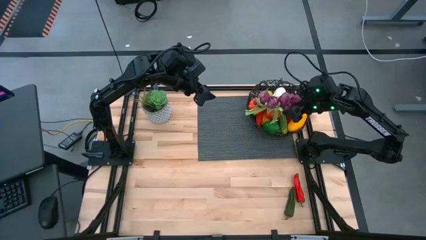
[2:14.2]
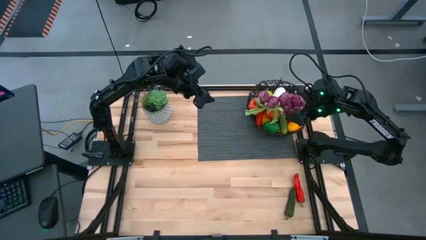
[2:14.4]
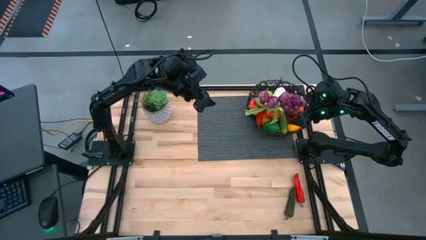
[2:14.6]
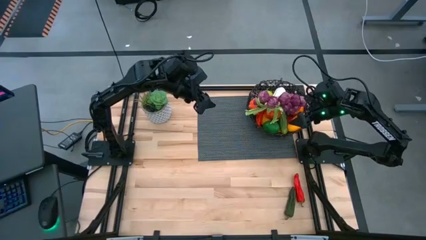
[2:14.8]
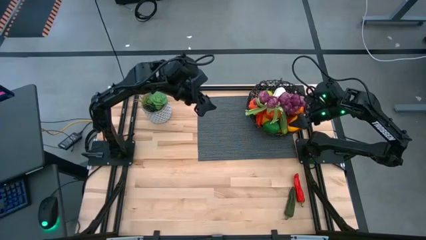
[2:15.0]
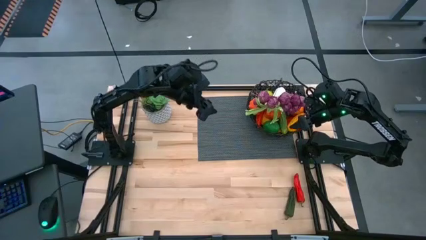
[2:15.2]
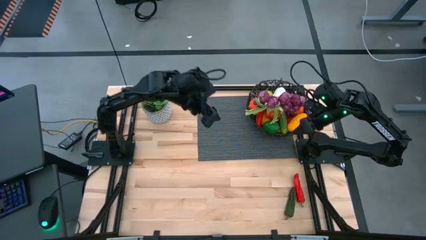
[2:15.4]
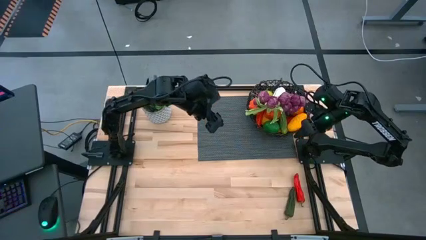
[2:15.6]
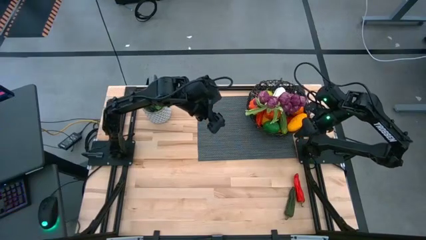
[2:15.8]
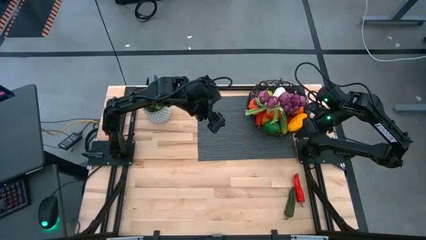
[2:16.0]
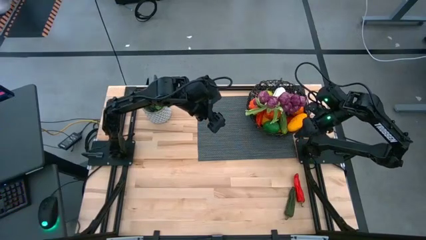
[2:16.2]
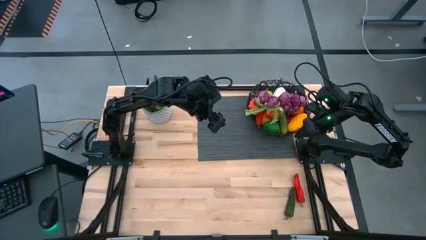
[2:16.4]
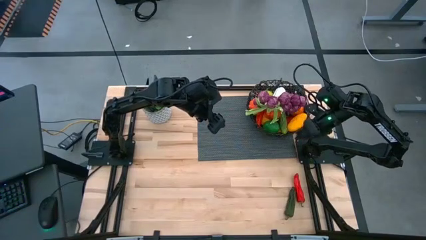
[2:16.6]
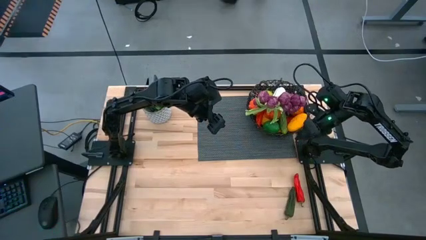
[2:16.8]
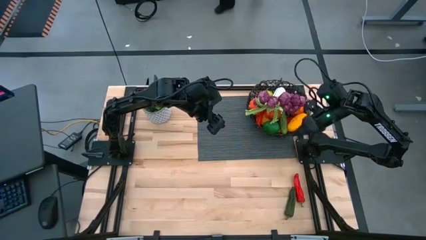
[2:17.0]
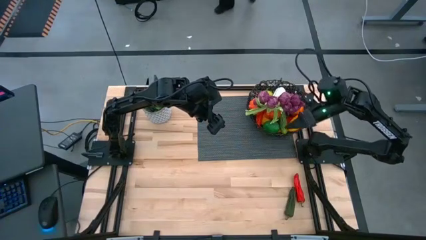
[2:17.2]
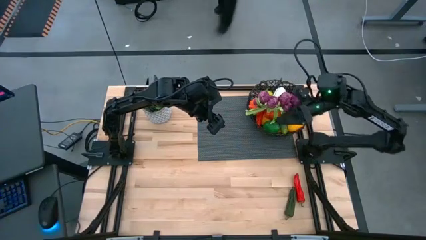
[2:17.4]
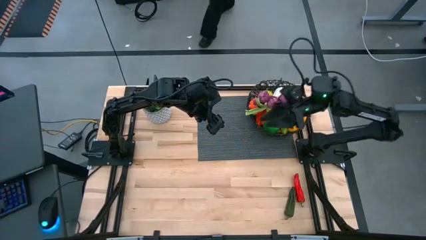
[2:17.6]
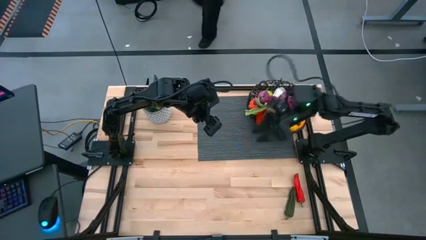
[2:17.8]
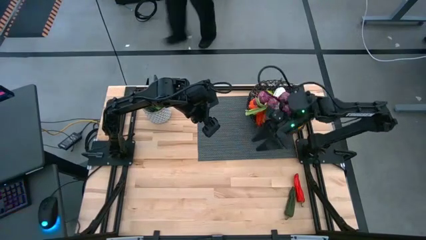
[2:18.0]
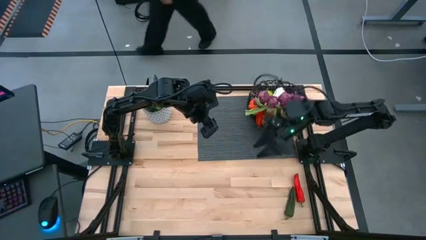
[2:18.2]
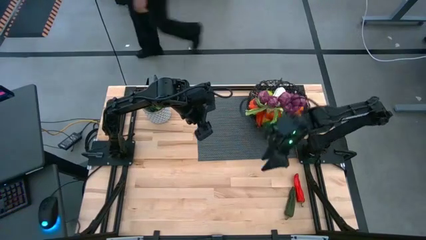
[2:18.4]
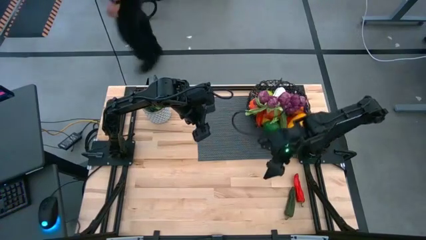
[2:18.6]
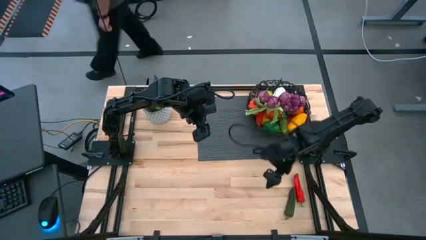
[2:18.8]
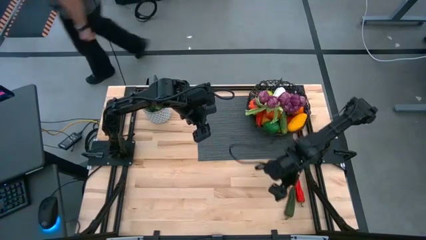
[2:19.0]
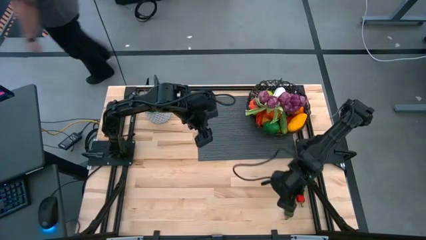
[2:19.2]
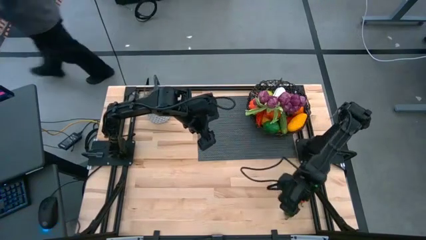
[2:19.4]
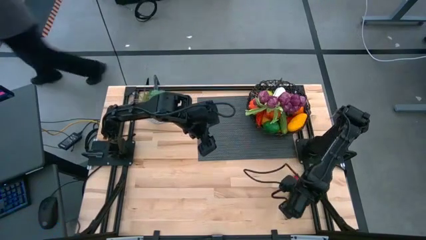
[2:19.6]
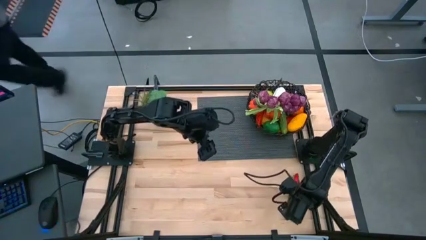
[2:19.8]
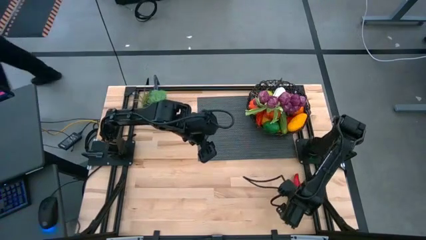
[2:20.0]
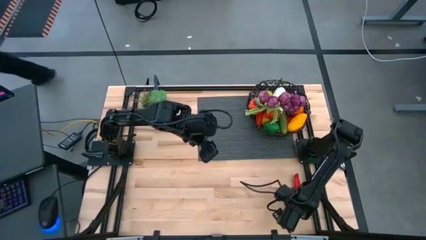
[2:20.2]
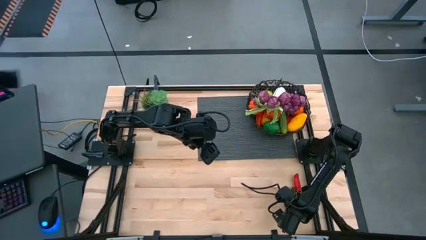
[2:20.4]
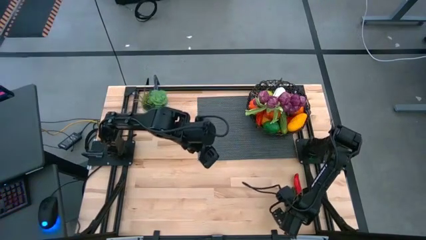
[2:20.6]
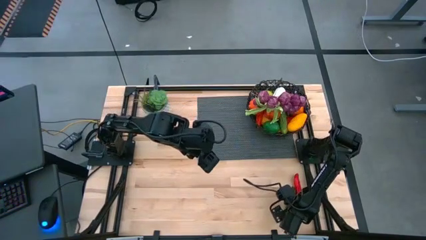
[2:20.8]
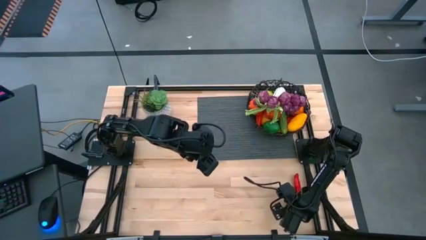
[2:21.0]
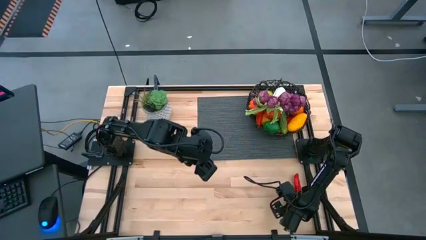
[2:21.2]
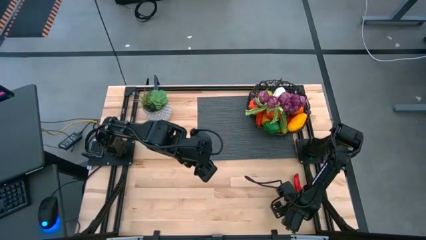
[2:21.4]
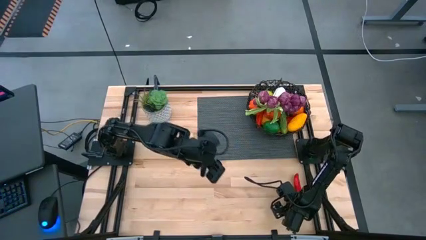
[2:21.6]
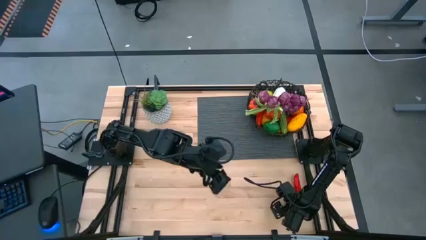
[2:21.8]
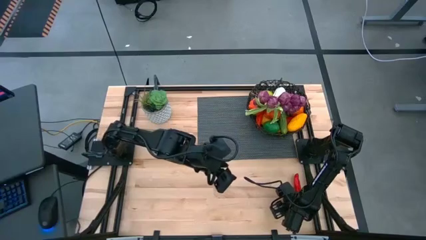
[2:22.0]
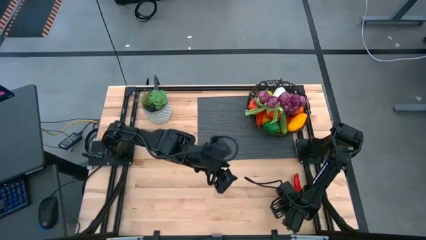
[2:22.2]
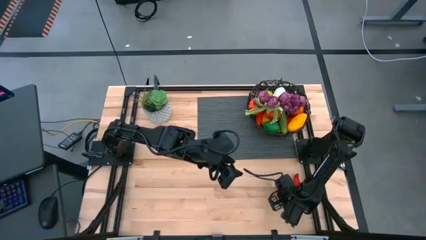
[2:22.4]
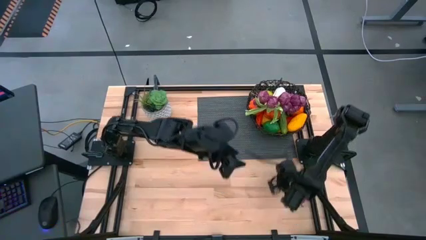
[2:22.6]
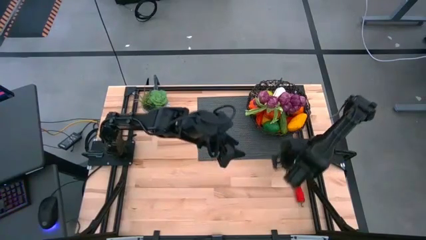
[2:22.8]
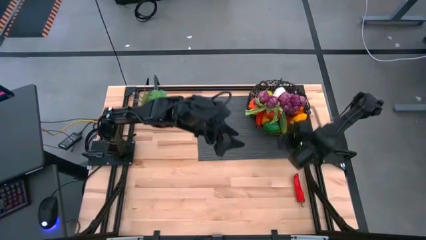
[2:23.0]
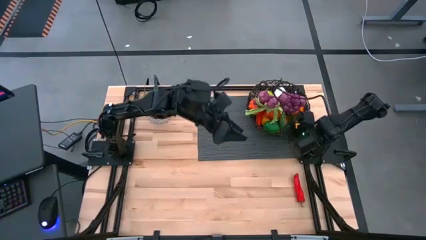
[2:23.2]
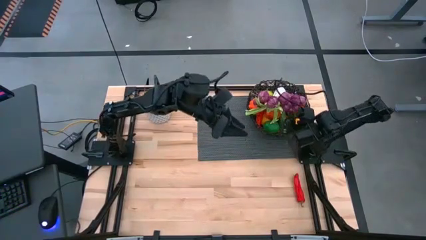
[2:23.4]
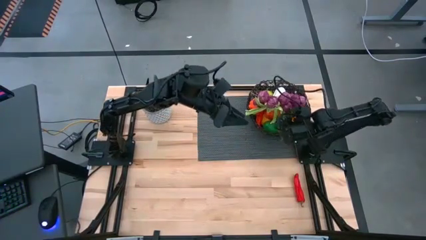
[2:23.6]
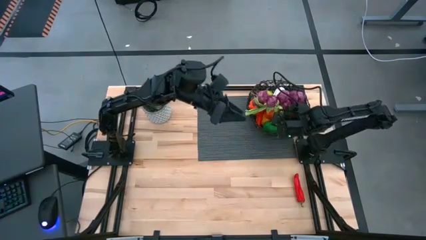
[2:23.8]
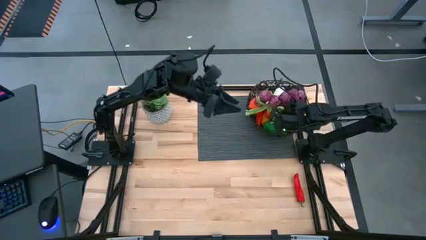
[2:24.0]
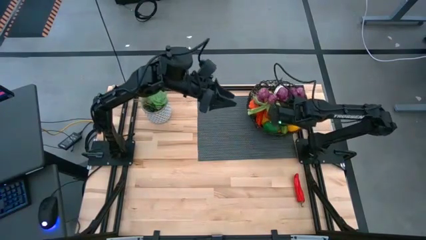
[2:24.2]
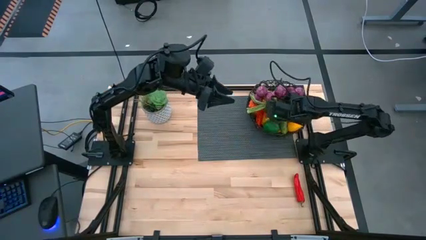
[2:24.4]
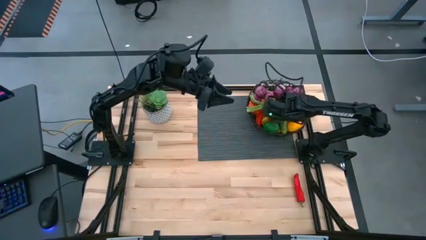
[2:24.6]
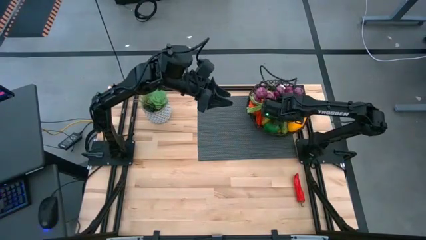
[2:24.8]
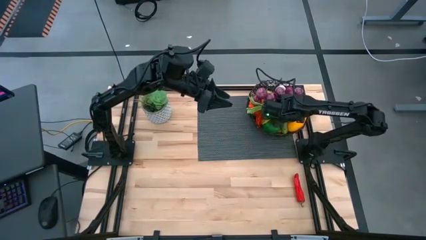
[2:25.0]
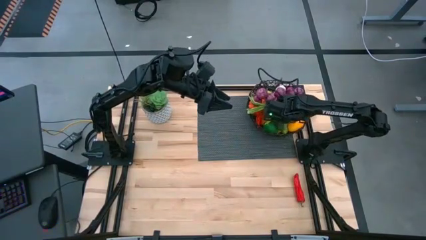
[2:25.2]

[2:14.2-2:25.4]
Task: Build produce basket
Put the green chili pepper into the black basket

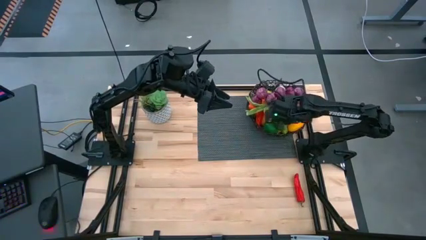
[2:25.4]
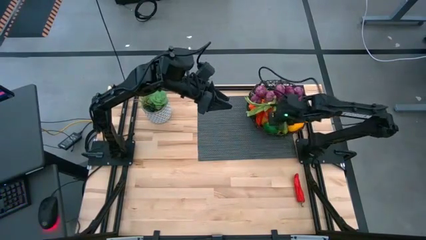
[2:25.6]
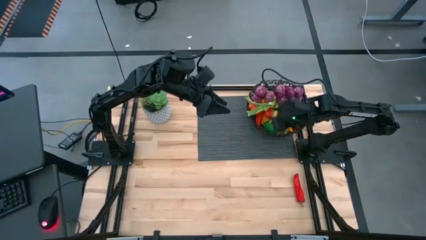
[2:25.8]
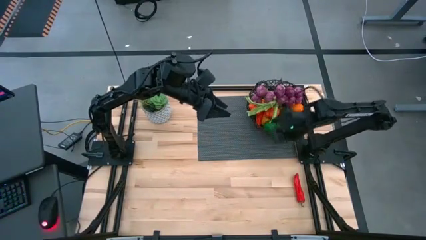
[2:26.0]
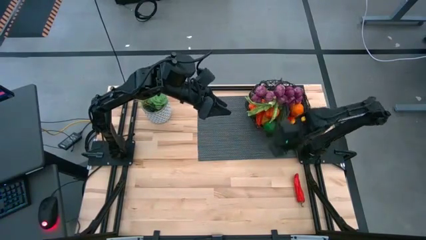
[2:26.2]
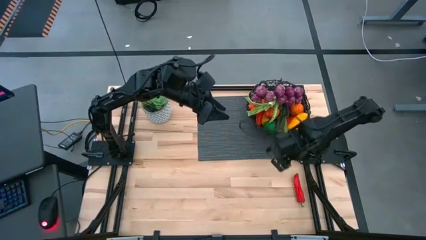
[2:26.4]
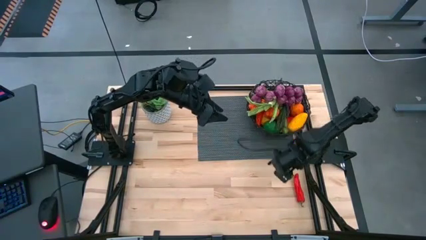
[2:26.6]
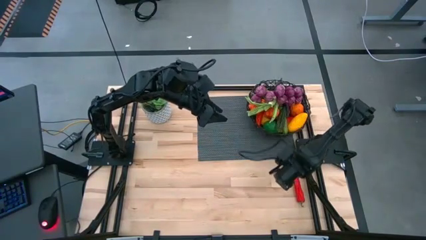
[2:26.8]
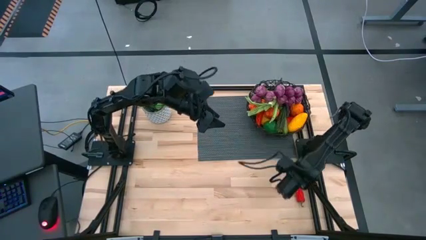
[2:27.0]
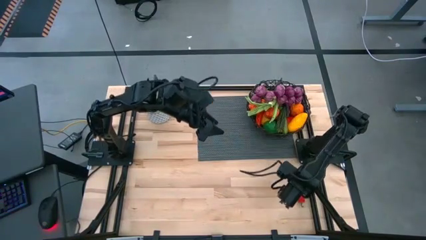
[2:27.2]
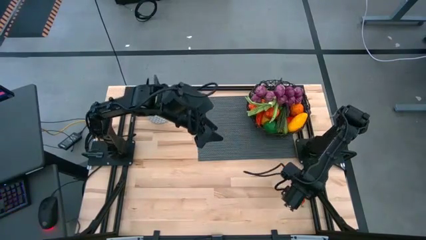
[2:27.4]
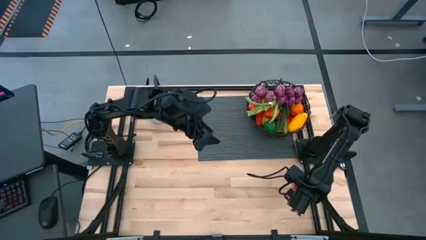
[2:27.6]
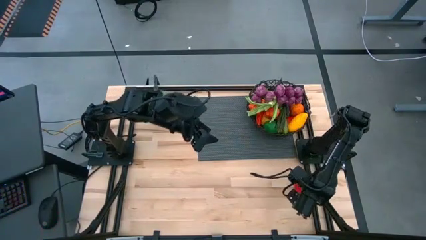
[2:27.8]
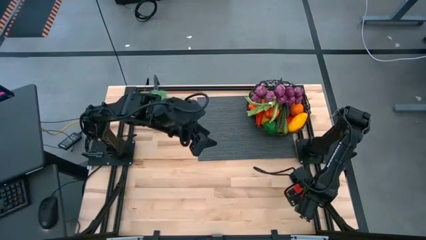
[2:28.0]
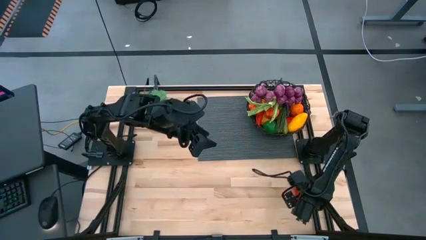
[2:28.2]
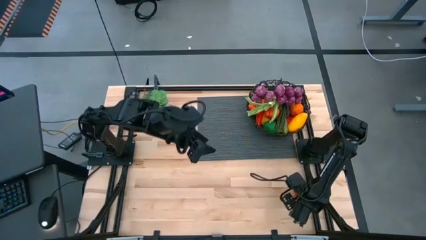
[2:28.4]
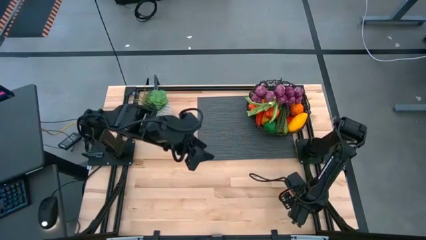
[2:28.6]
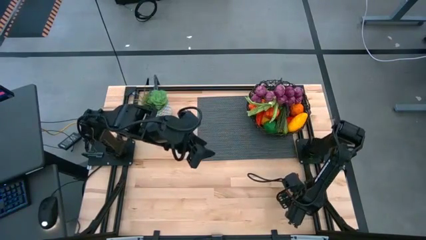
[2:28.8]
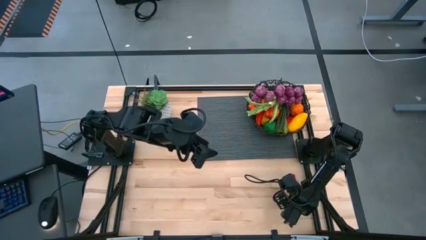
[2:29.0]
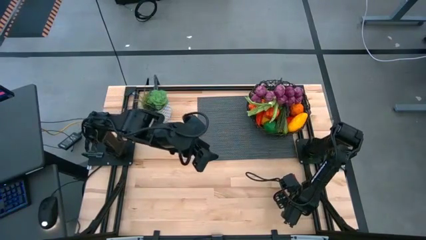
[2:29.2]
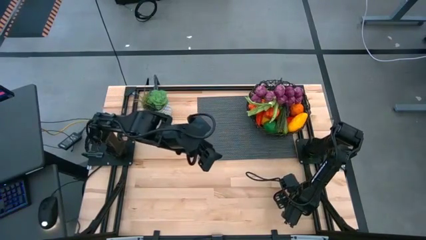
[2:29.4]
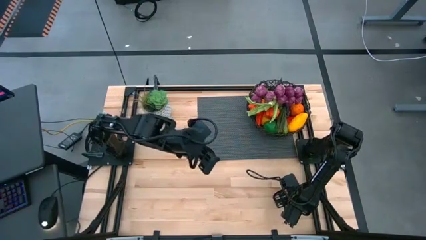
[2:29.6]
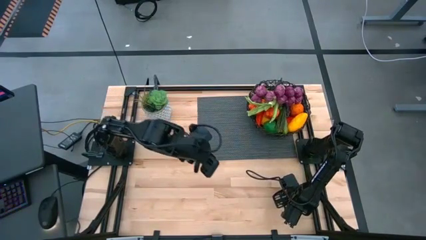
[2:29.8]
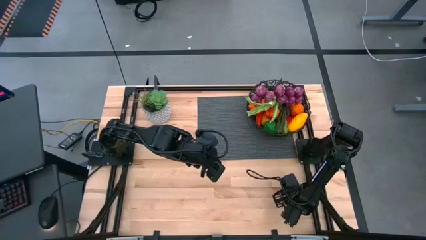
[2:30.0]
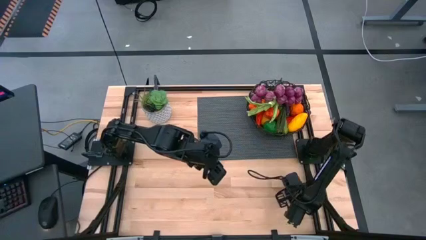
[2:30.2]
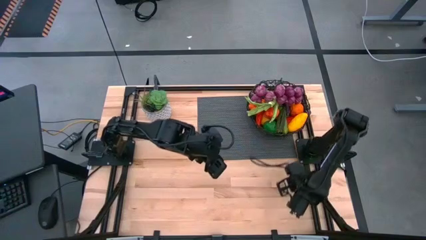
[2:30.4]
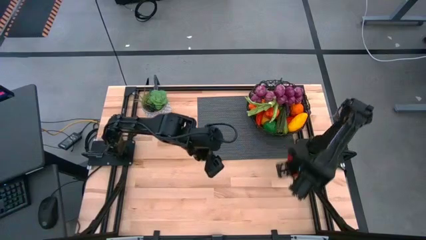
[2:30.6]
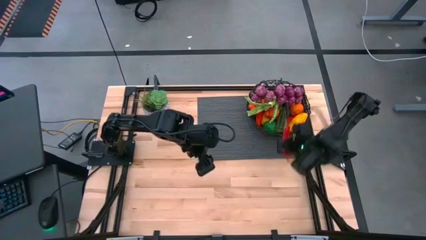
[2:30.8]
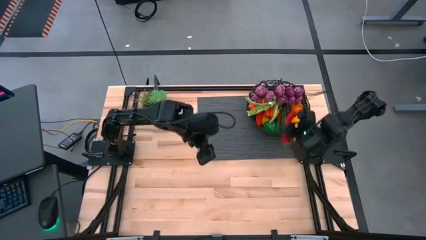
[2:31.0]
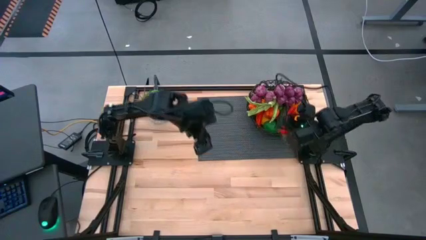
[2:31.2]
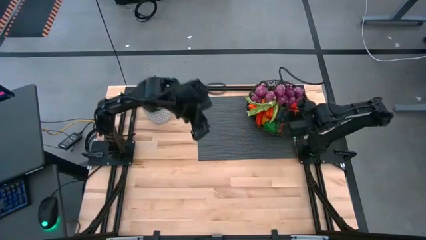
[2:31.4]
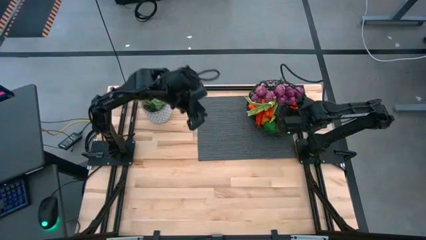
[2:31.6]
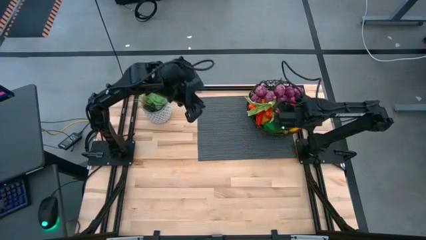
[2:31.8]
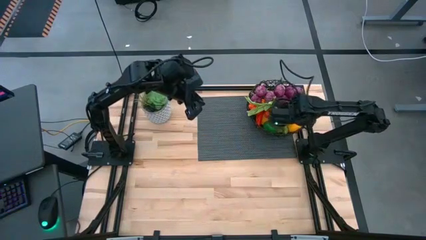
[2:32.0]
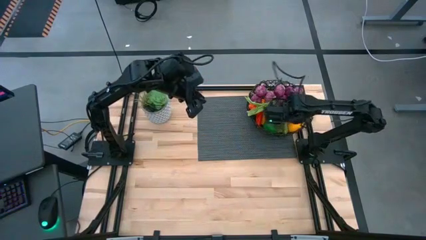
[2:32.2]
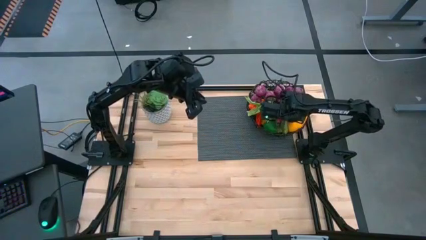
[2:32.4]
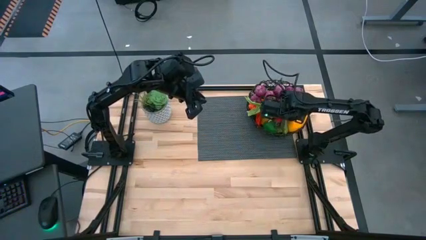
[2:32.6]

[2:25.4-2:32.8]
Put the red chili pepper into the black basket
